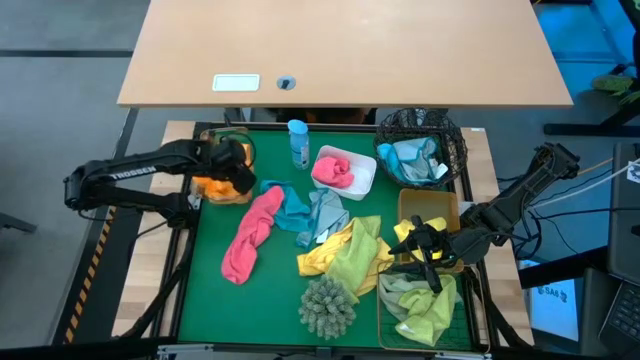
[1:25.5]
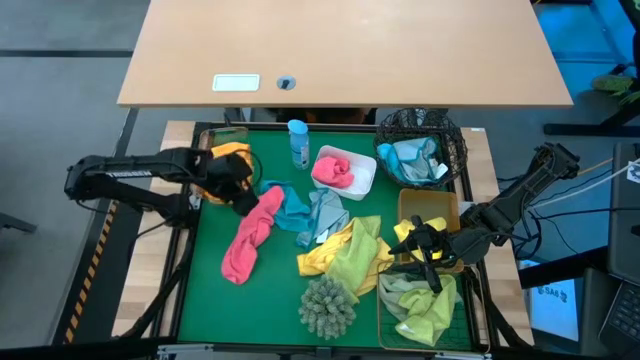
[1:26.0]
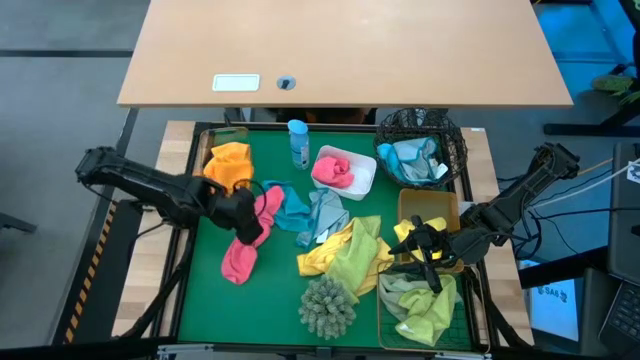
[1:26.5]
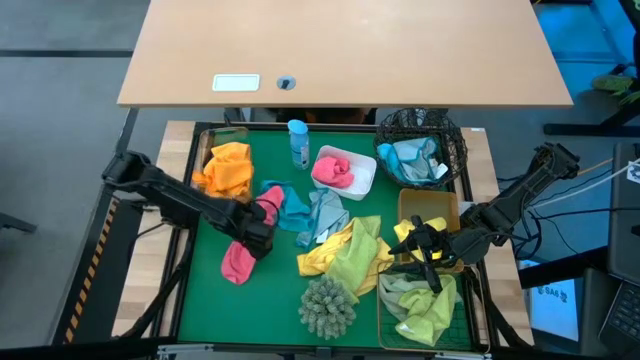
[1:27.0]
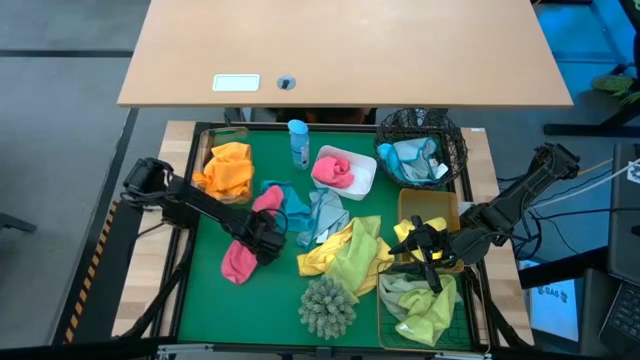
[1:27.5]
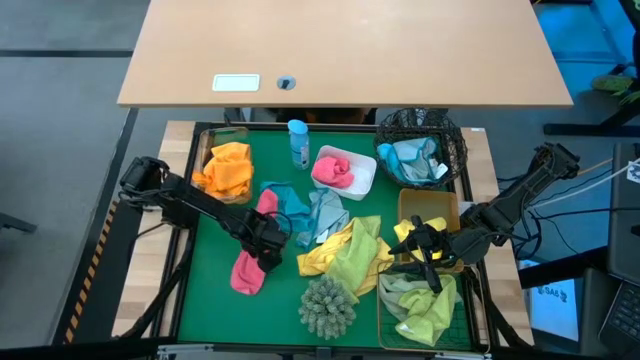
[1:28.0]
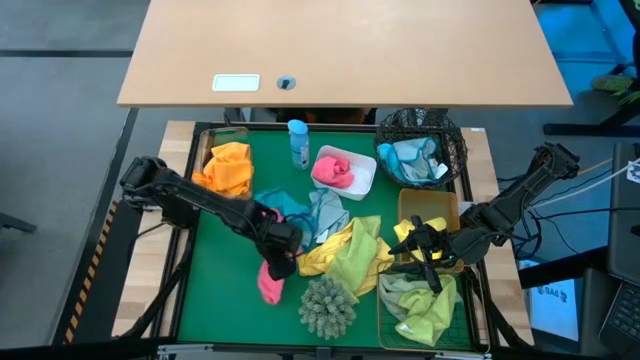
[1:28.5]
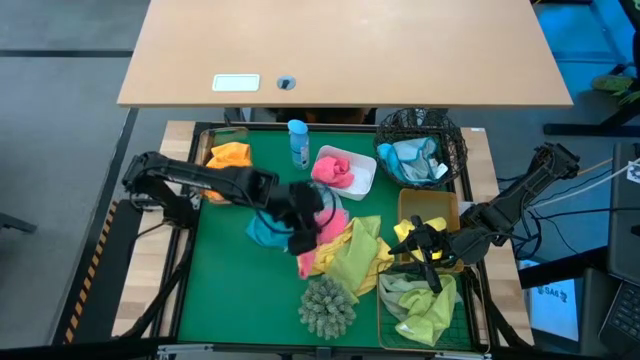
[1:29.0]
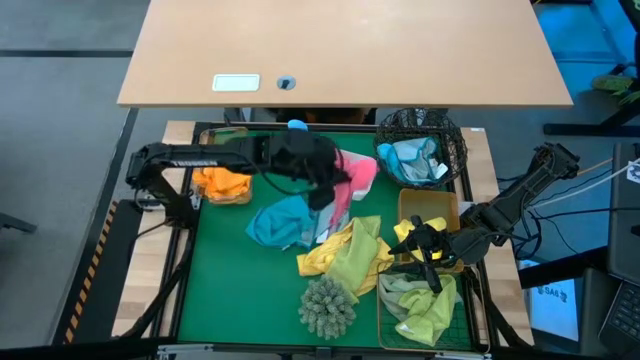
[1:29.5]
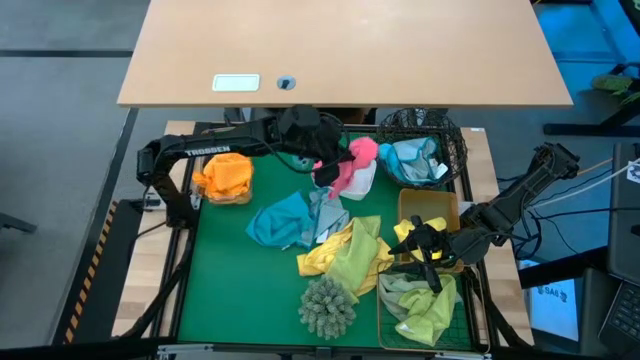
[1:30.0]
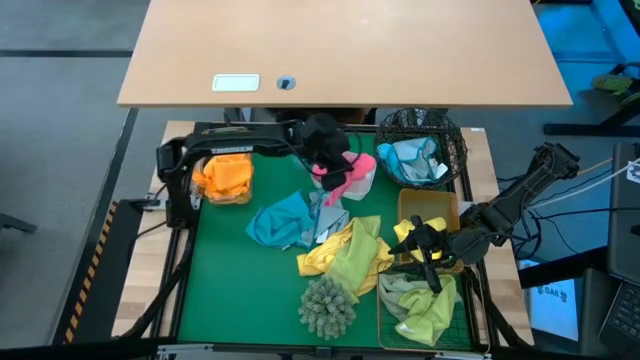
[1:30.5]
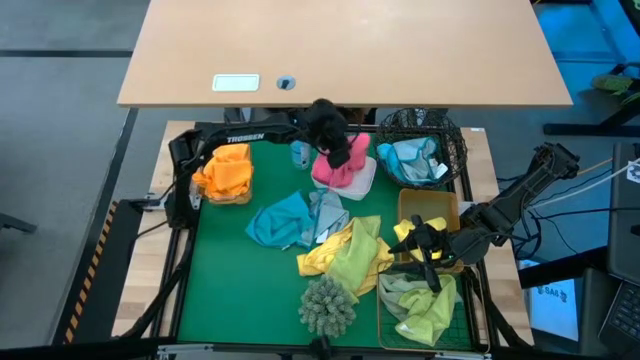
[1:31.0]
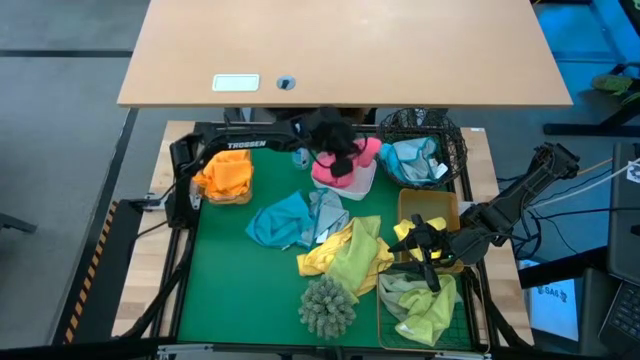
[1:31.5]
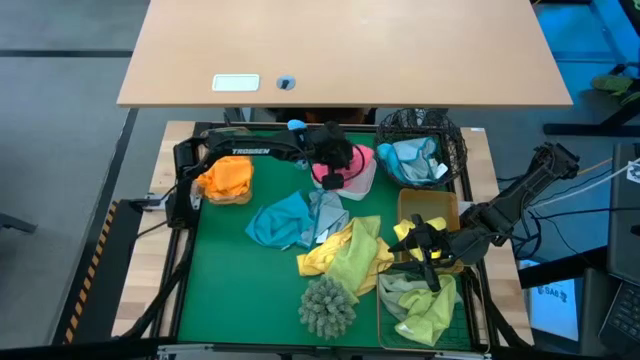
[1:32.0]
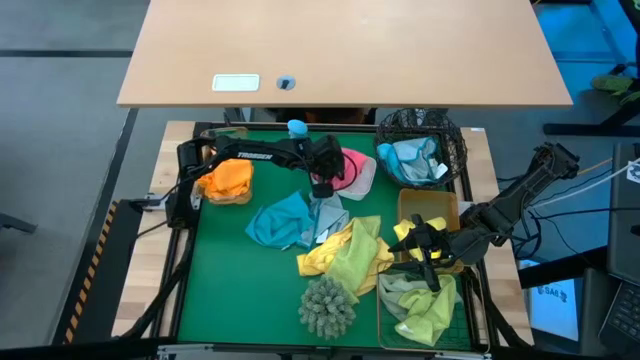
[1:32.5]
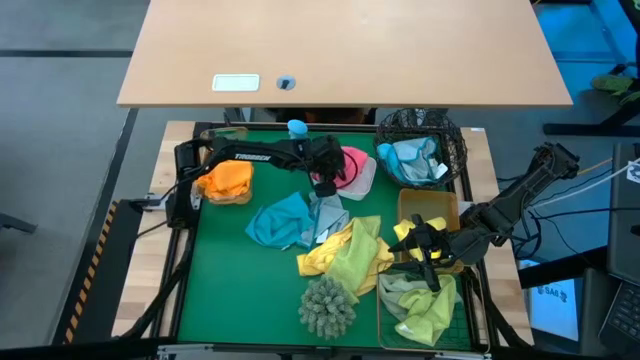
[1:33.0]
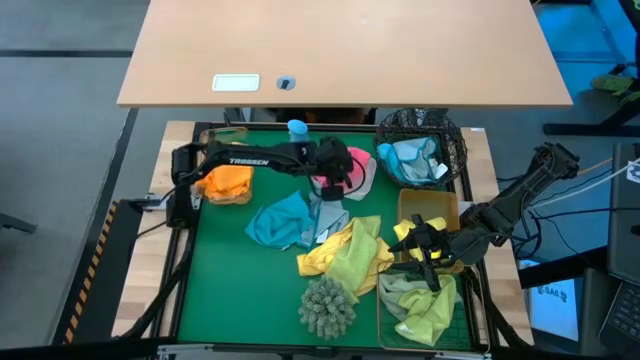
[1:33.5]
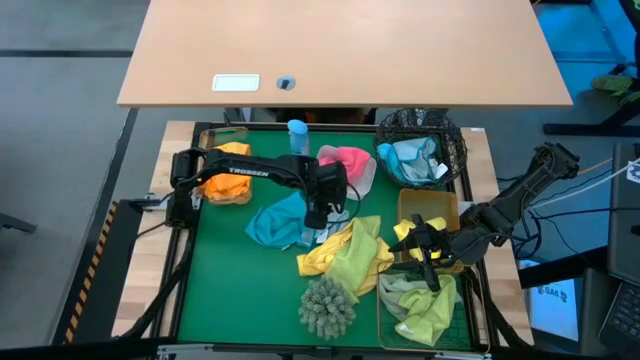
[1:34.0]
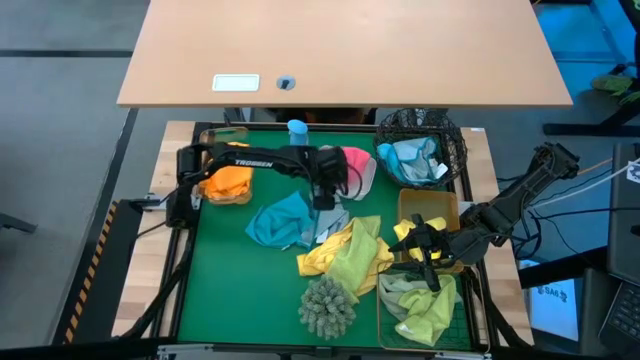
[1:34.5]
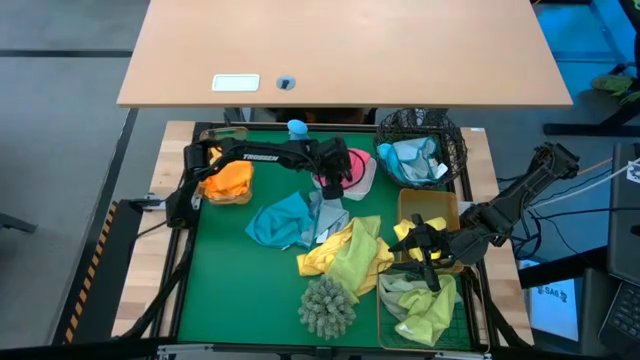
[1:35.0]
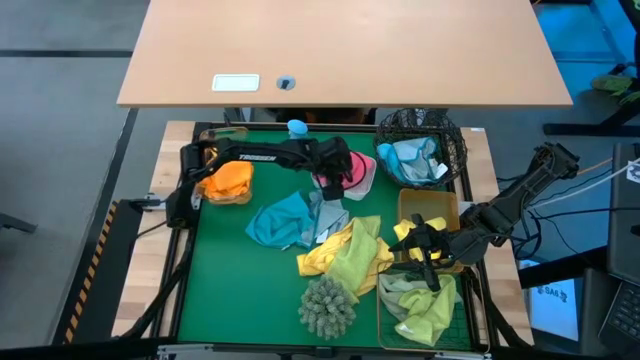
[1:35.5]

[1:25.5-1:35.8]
Task: Sort microfiber towel by color & place in baskets
Put the pink microfiber towel into the white bin

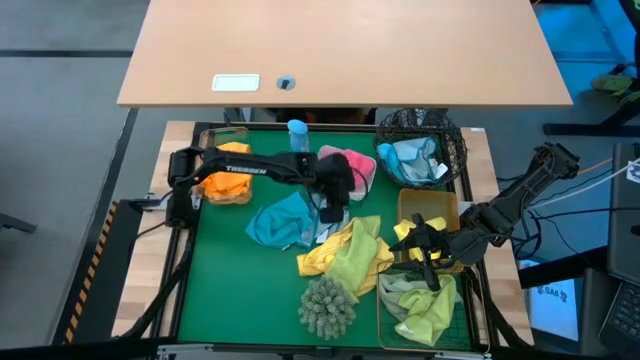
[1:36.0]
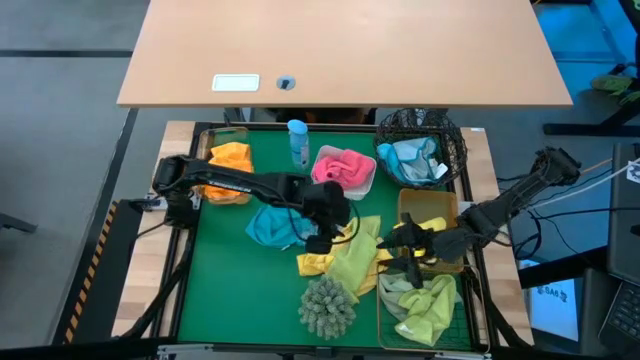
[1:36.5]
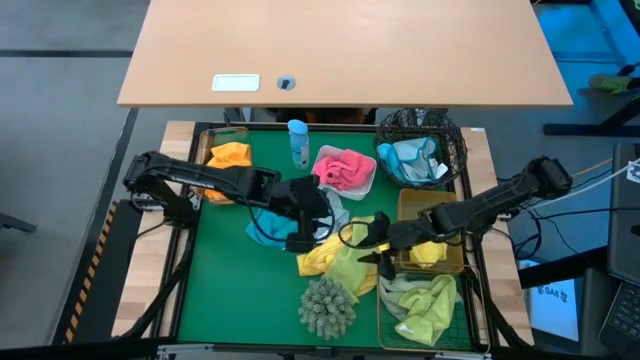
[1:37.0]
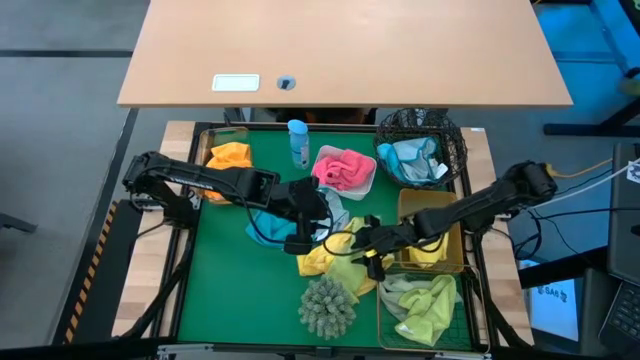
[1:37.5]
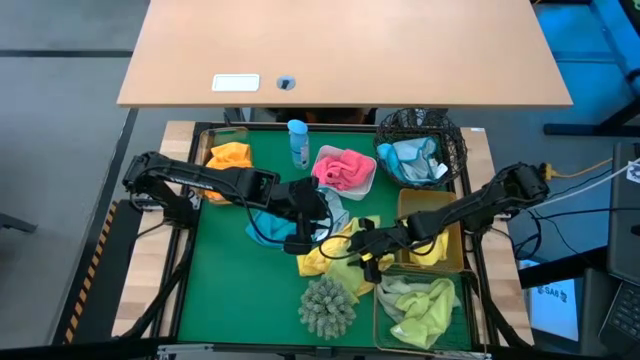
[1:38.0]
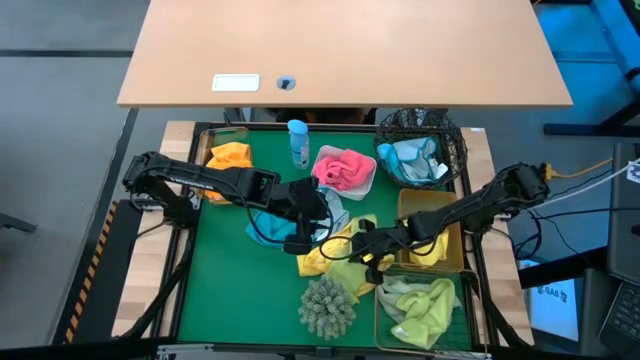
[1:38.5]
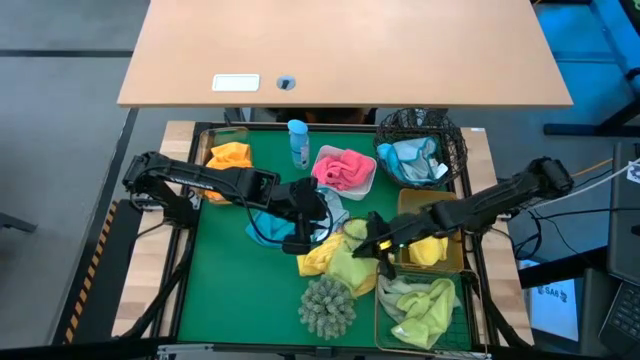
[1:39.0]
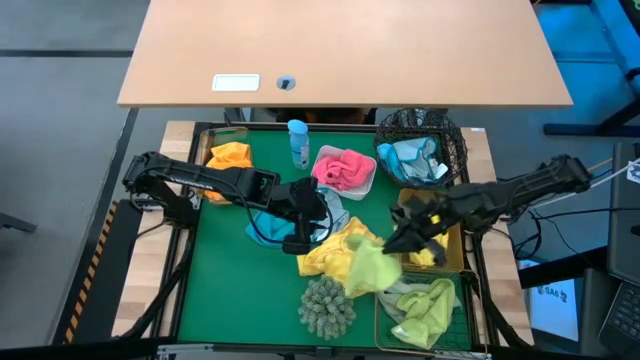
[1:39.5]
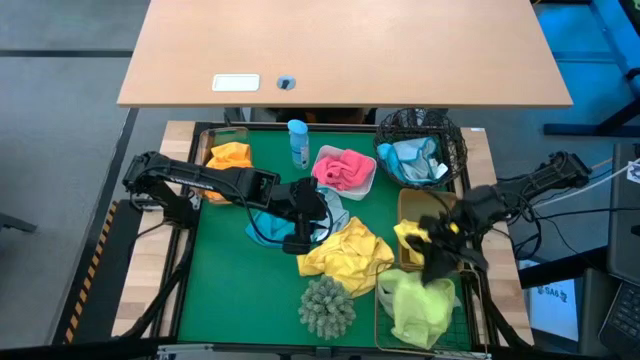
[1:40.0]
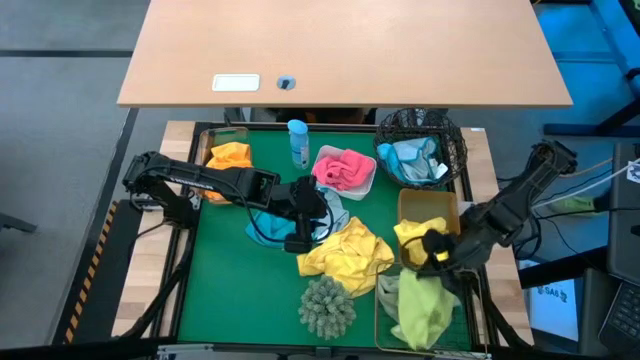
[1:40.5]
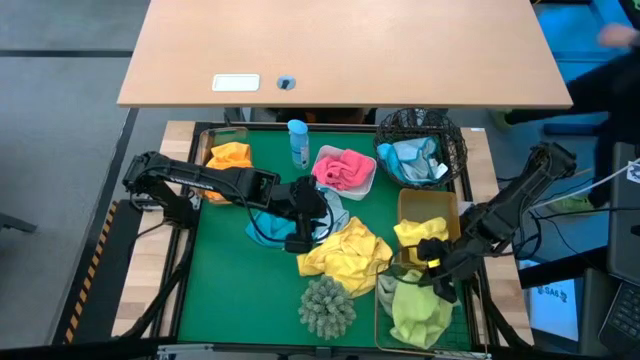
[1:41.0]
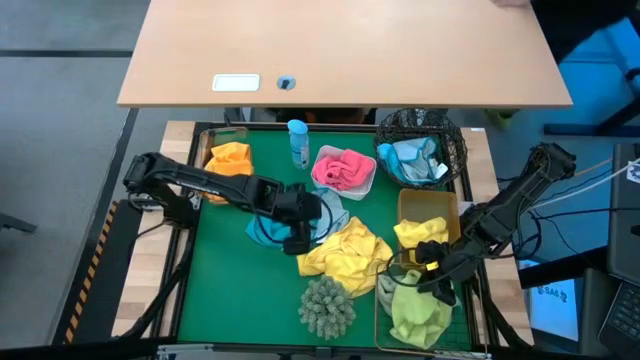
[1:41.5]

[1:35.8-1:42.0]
Put the green microfiber towel into the rectangular wire basket

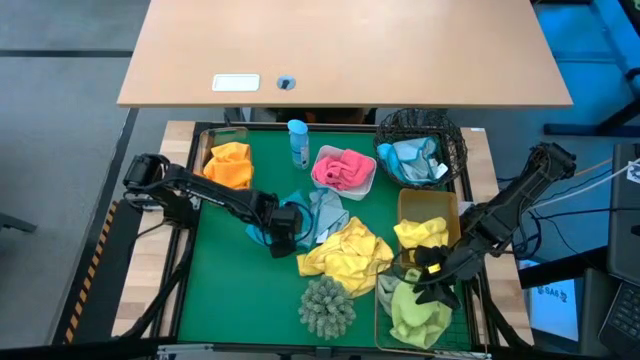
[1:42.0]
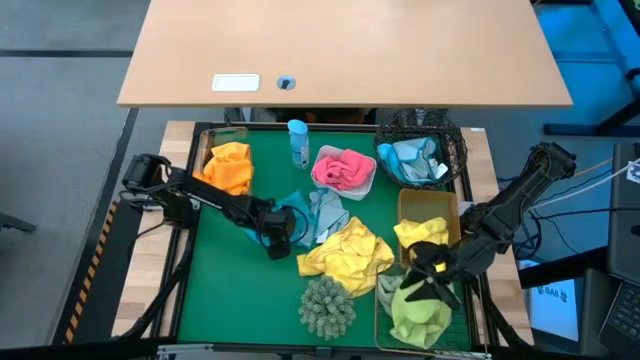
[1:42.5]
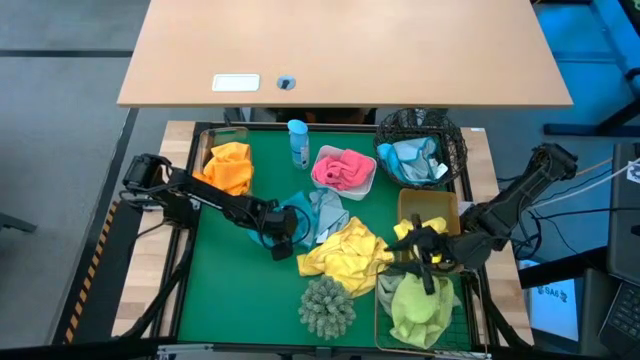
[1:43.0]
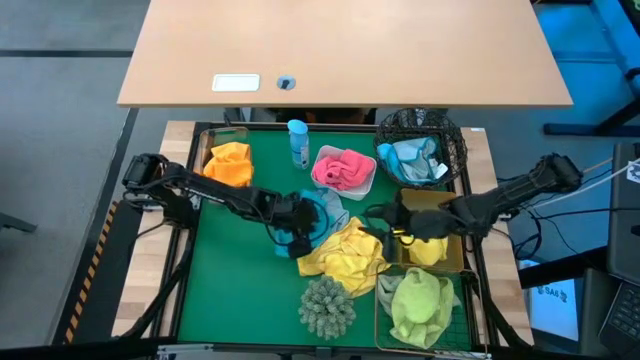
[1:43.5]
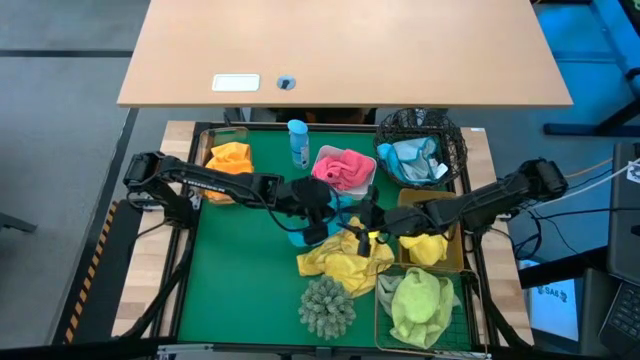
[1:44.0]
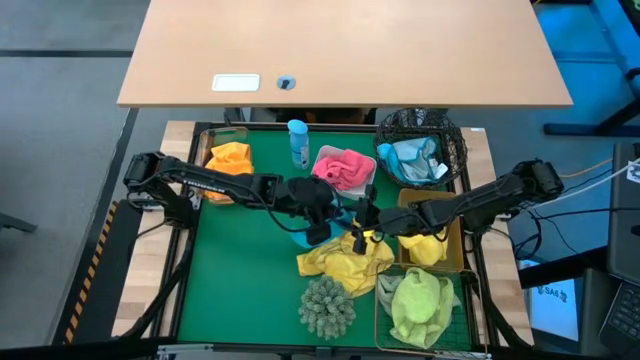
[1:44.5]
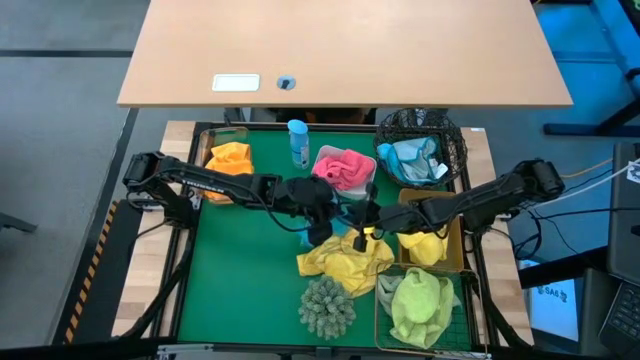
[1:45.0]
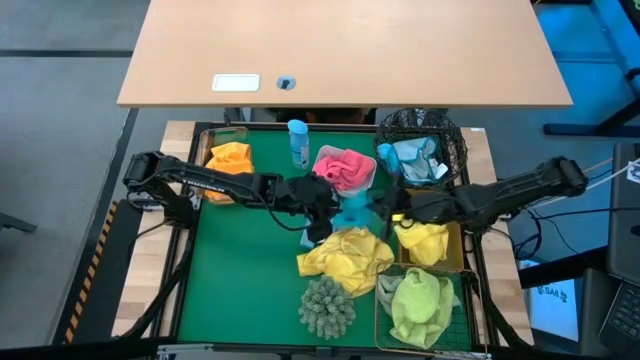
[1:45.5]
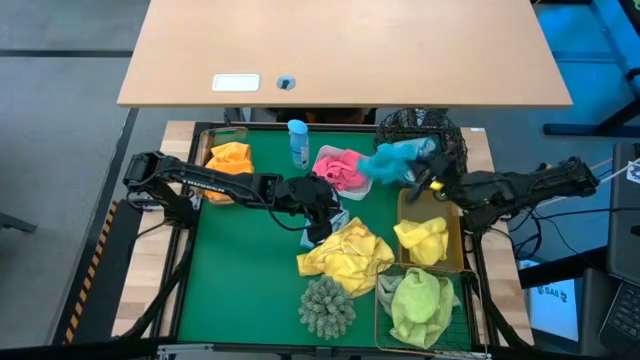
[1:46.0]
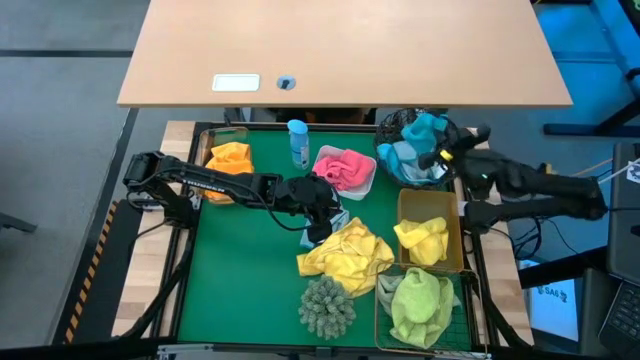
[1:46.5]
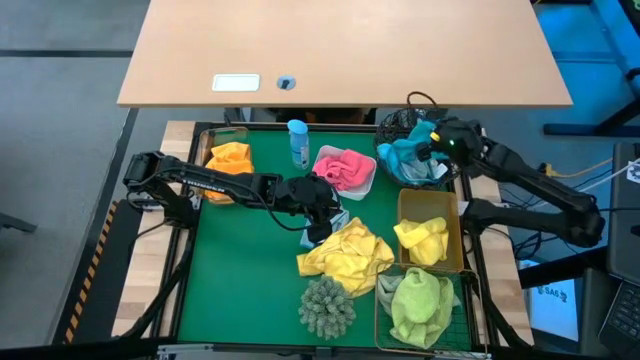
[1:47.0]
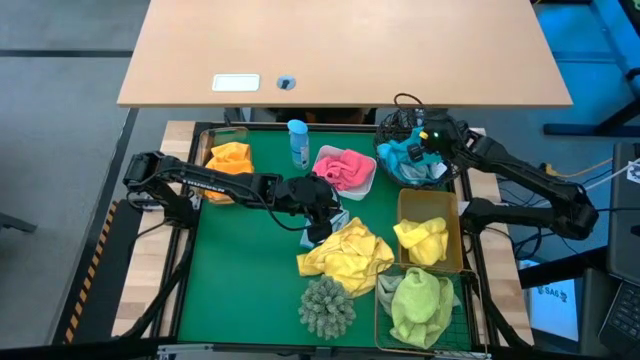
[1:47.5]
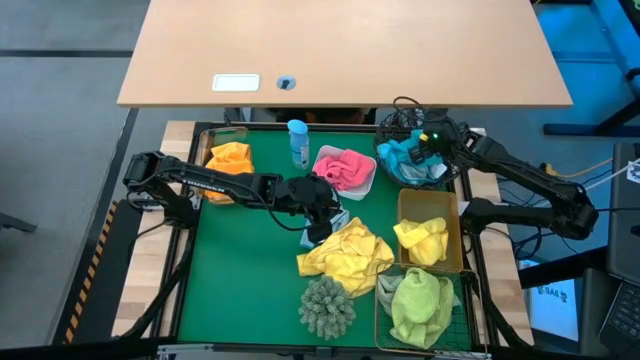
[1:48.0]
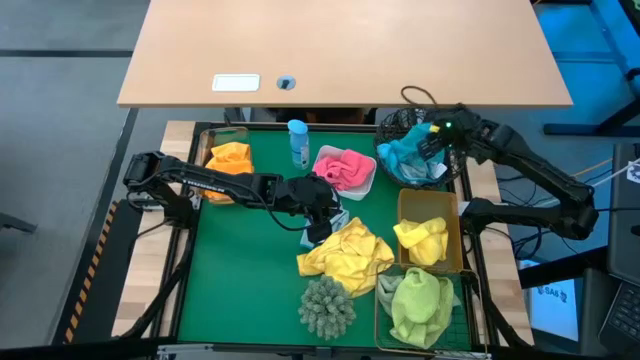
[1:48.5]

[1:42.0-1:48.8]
Put the blue microfiber towel into the circular wire basket
